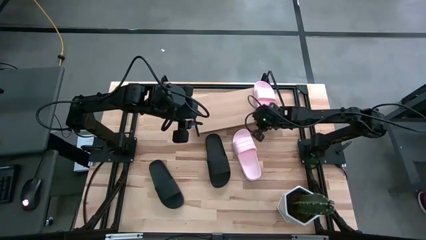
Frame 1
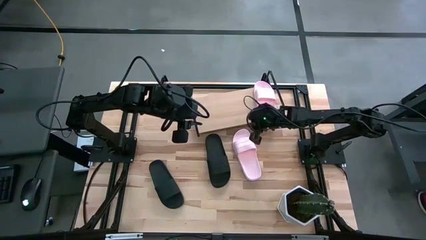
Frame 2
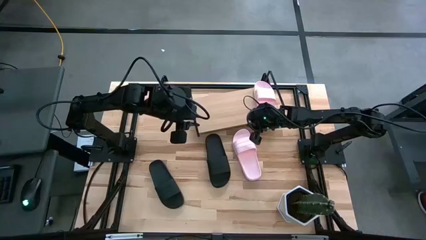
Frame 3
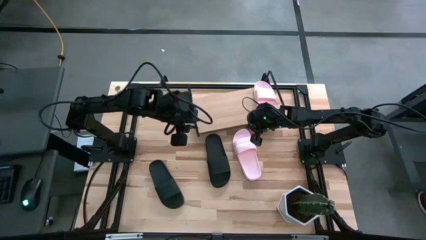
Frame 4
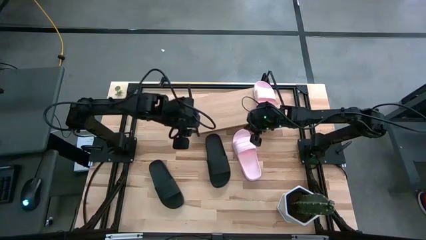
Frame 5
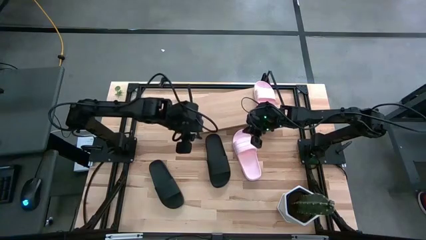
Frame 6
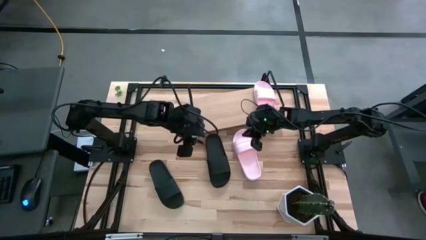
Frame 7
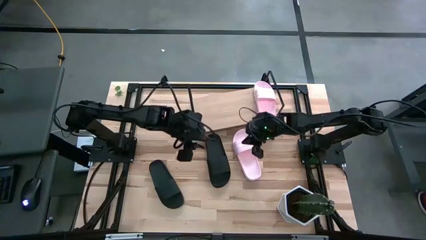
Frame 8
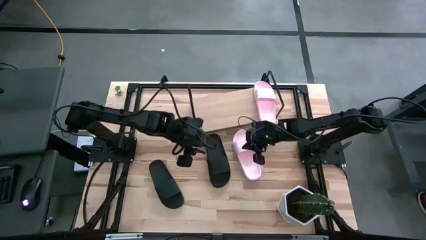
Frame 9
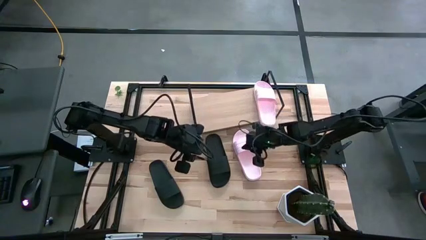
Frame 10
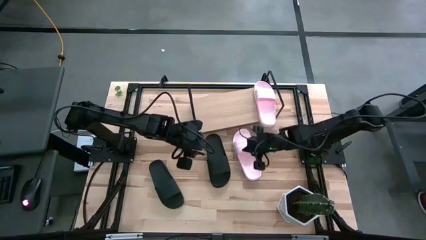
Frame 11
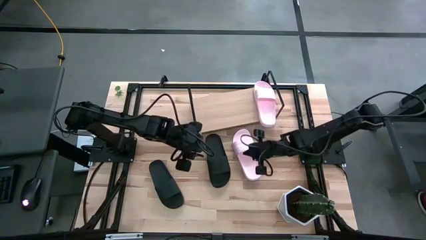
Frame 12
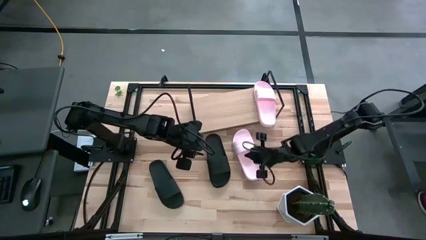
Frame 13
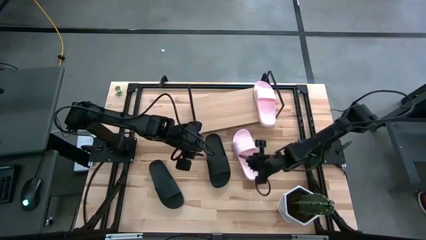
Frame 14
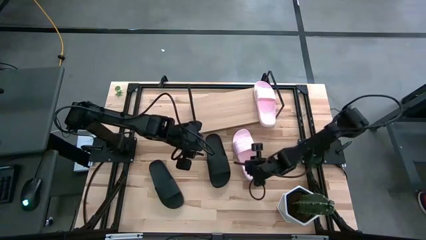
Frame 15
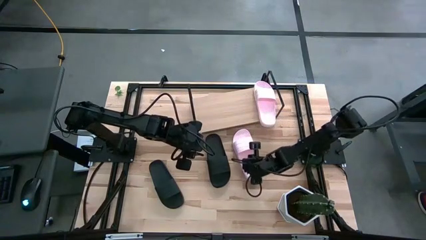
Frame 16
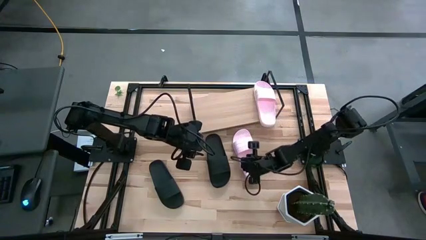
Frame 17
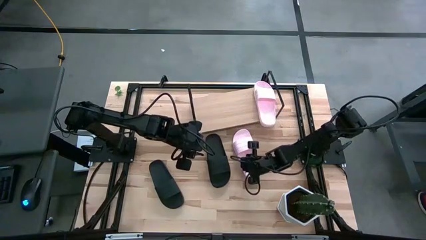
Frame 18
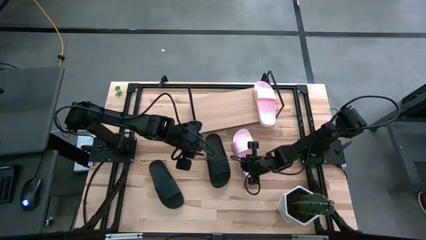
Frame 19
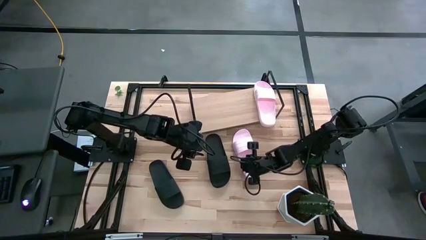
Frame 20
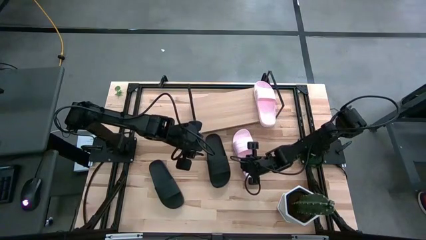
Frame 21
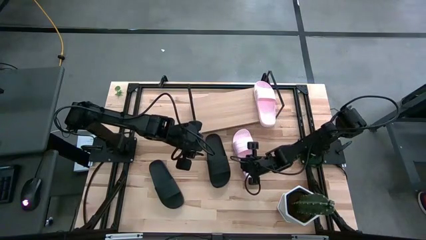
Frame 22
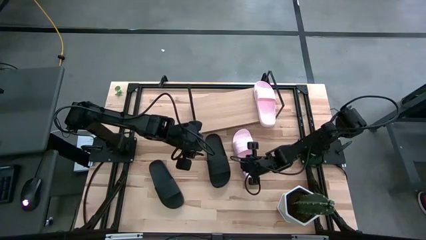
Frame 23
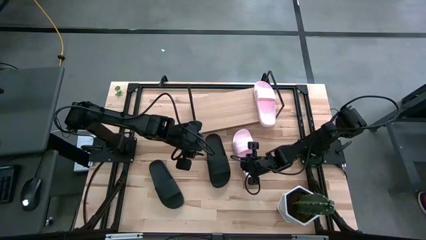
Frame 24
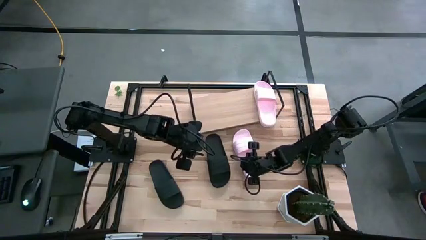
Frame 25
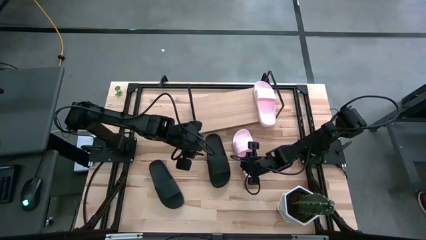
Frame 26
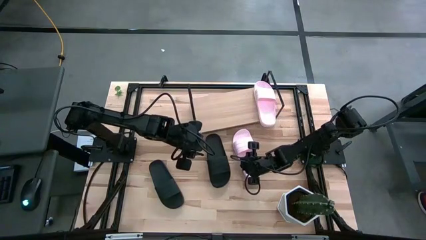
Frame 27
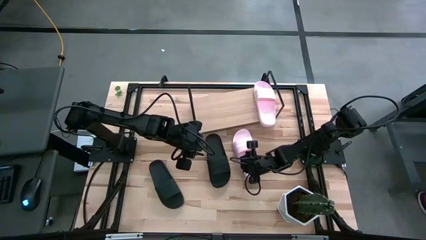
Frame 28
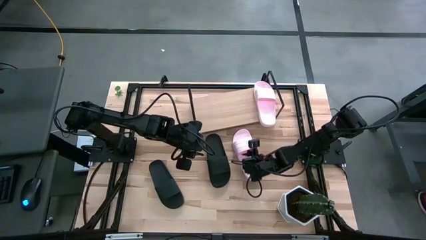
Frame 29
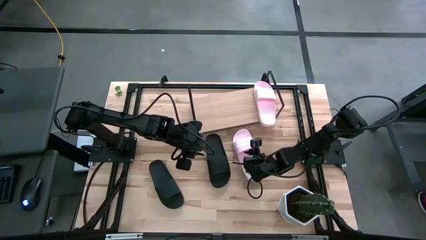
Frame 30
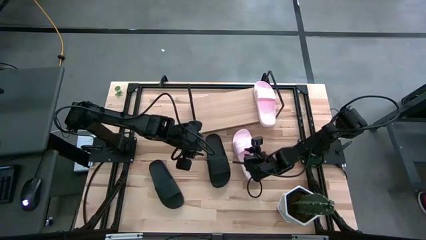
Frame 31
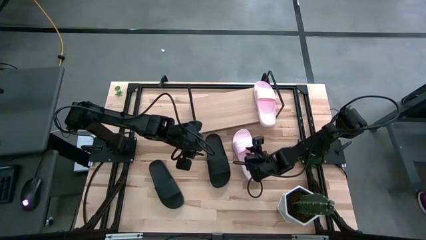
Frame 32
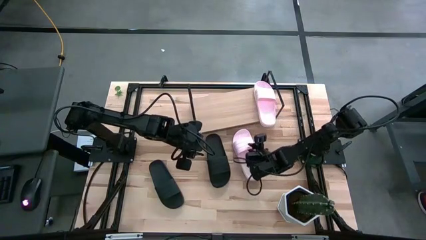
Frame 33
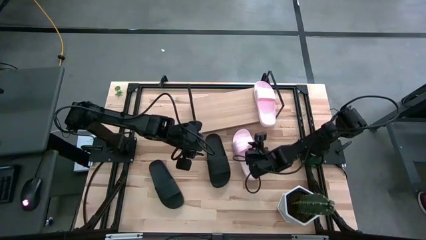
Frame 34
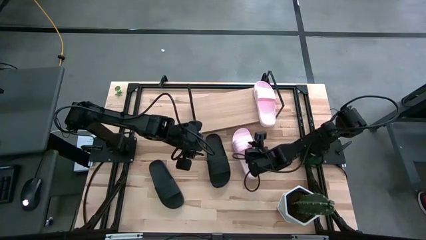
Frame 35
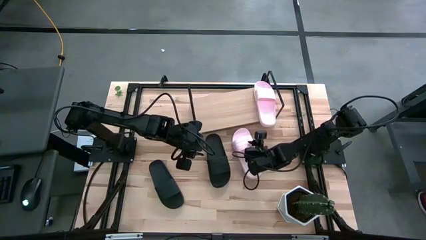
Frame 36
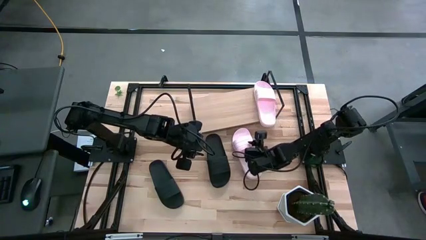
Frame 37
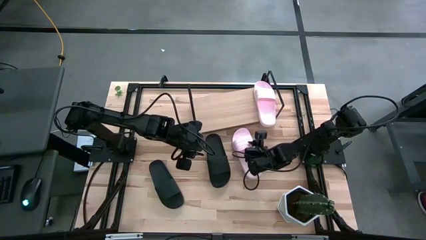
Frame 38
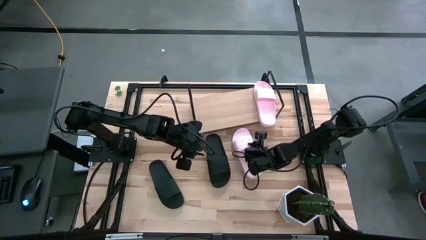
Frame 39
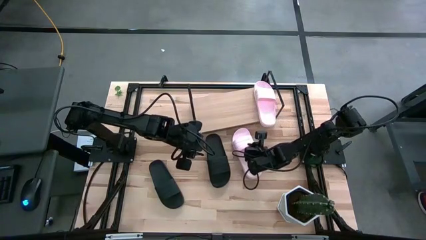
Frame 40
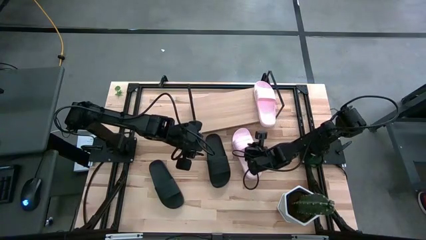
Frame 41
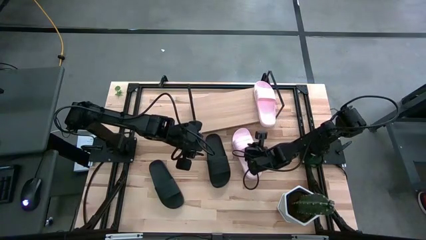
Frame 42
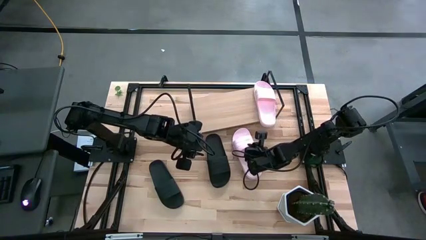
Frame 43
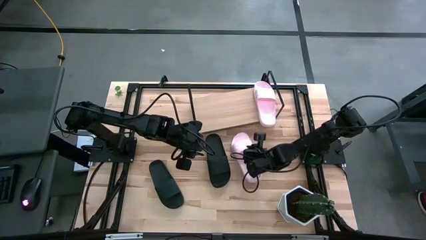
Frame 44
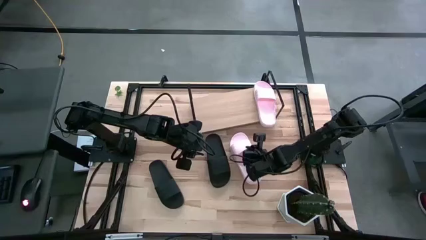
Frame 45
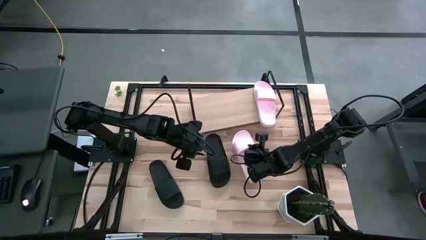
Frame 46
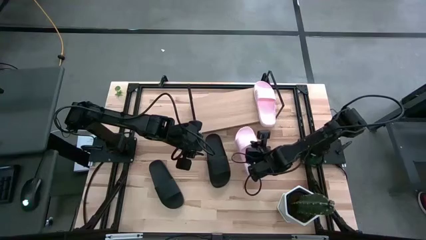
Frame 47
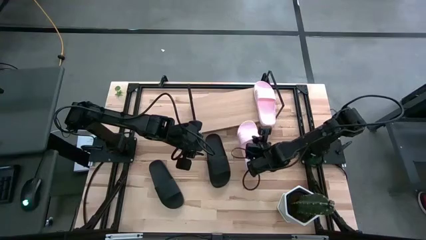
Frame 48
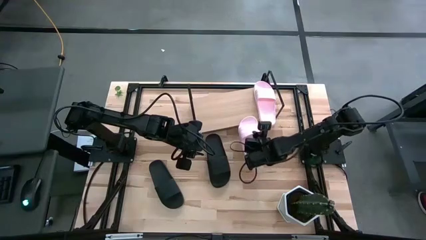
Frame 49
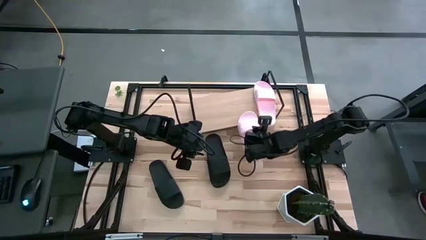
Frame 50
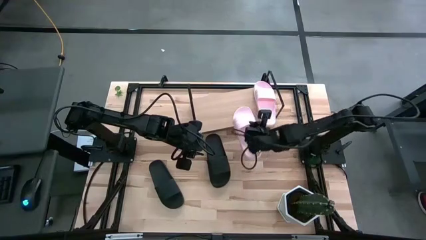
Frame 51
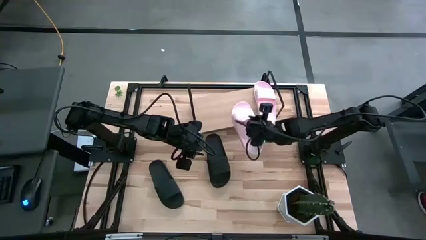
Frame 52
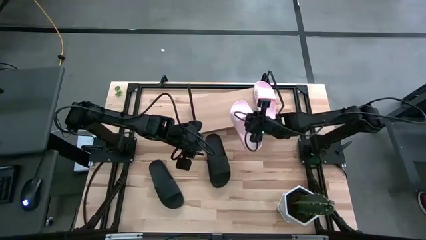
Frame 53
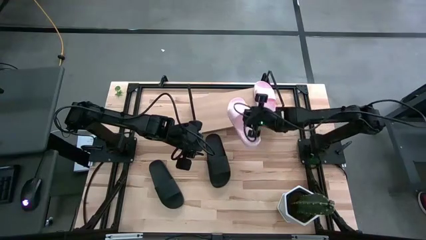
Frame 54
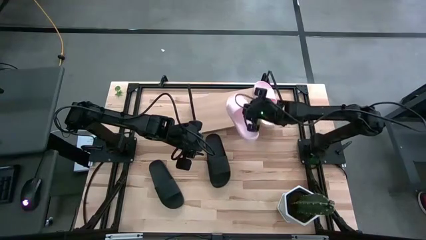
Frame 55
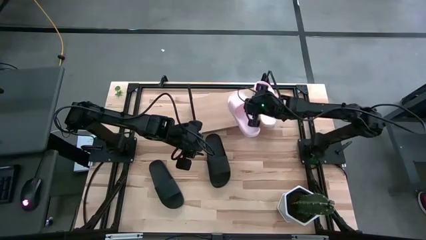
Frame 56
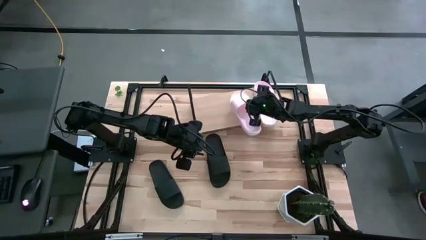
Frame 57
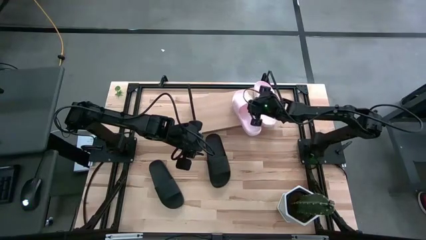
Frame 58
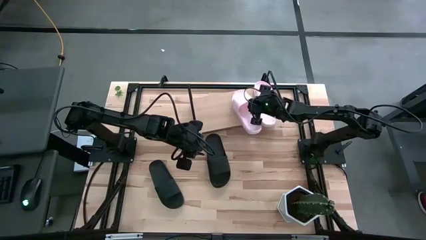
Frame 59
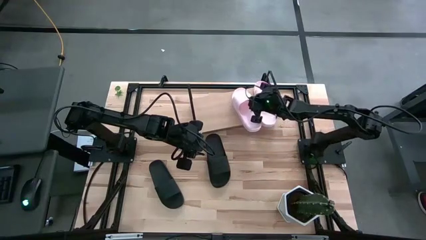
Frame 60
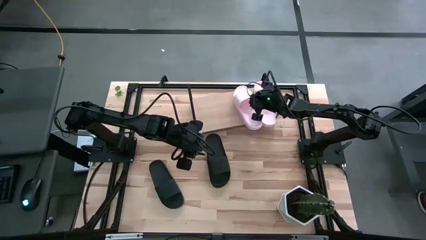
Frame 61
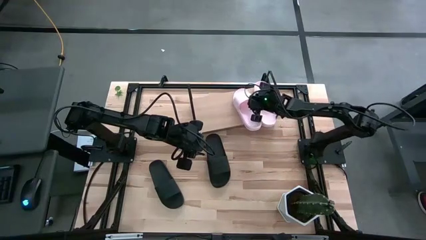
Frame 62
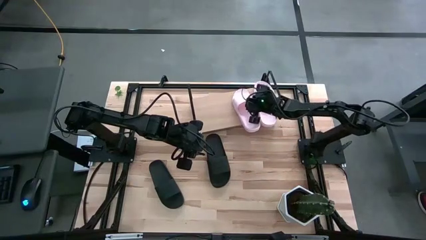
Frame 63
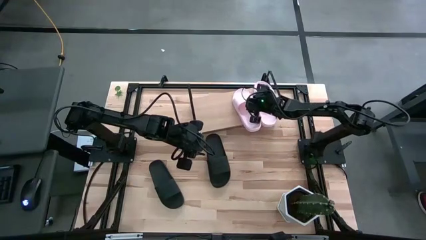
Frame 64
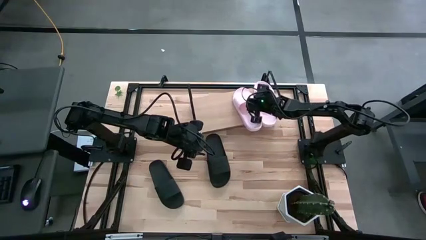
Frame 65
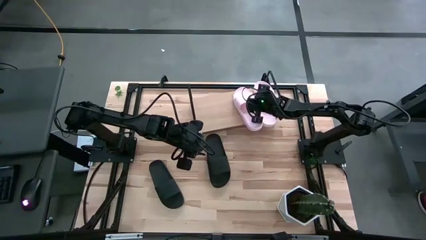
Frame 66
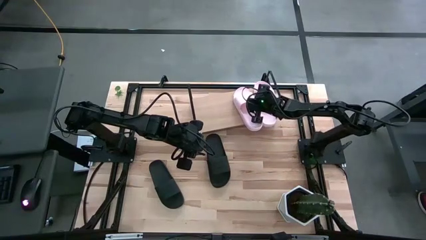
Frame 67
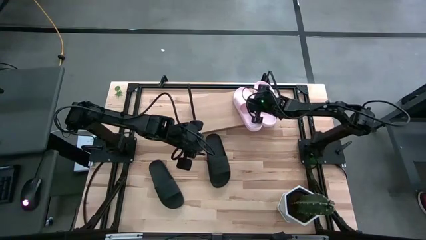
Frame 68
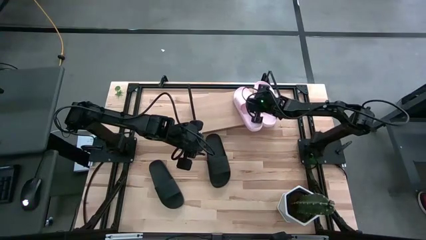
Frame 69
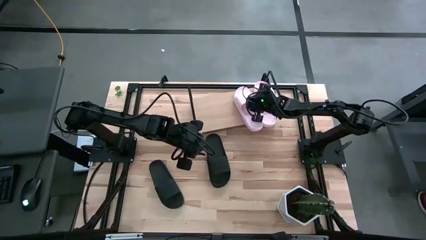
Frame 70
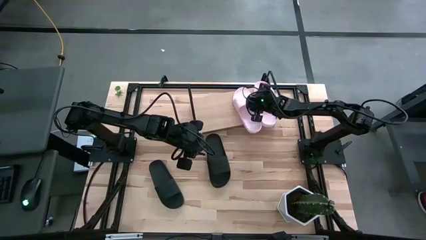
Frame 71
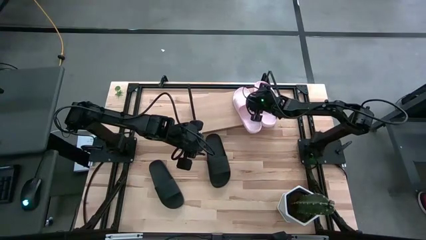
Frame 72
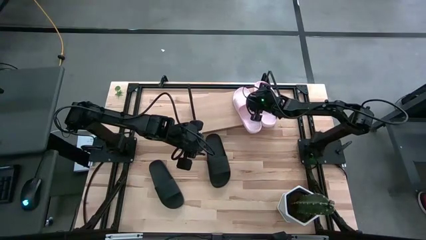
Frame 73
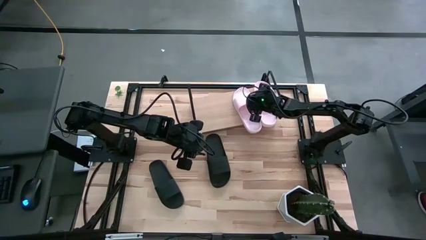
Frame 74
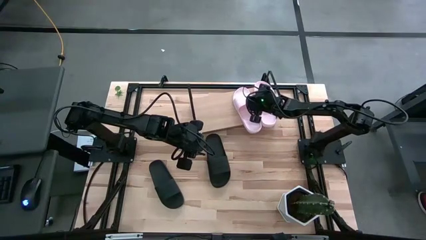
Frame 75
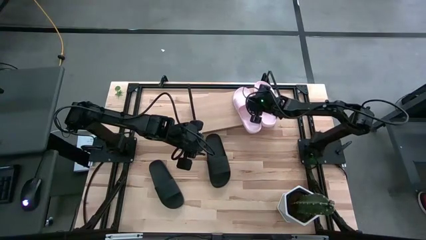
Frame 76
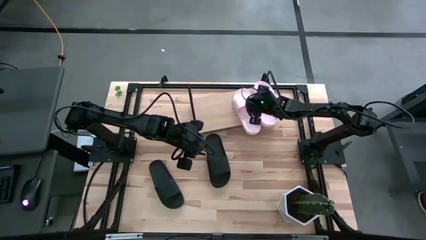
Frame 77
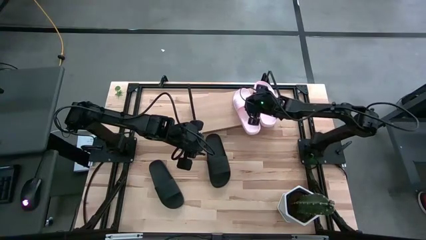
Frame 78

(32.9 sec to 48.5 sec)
Task: Pick and place slides into the shelf
Put the pink slide on the shelf
